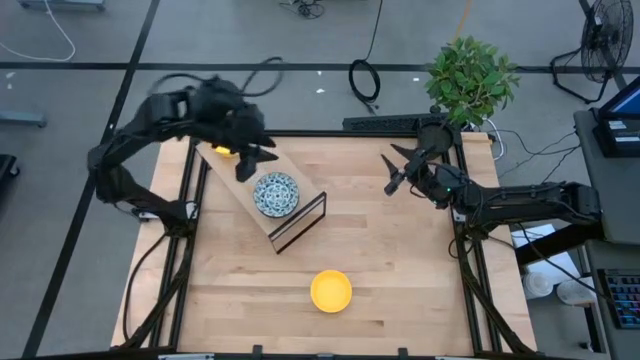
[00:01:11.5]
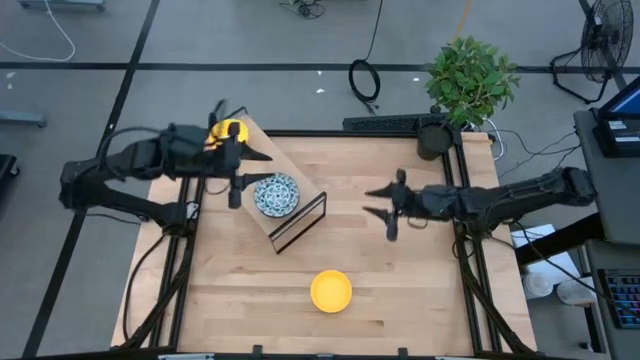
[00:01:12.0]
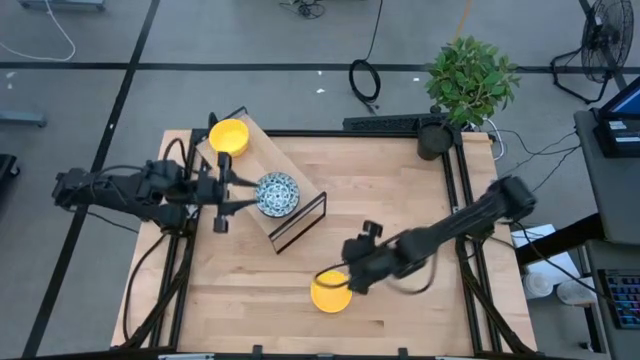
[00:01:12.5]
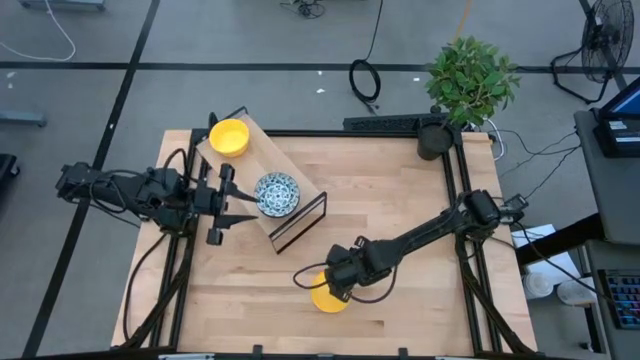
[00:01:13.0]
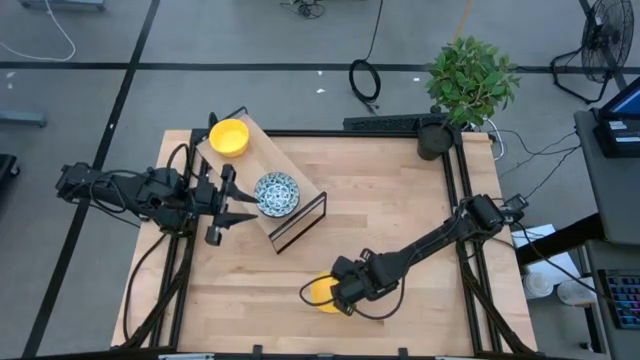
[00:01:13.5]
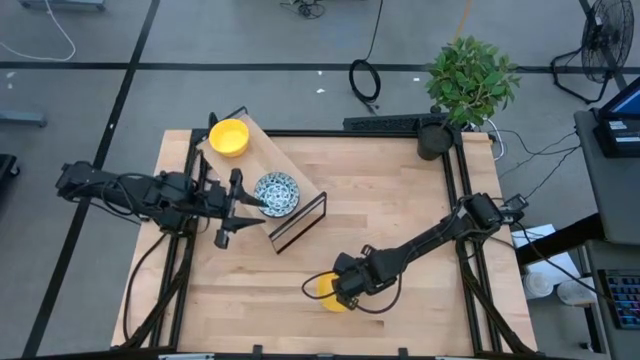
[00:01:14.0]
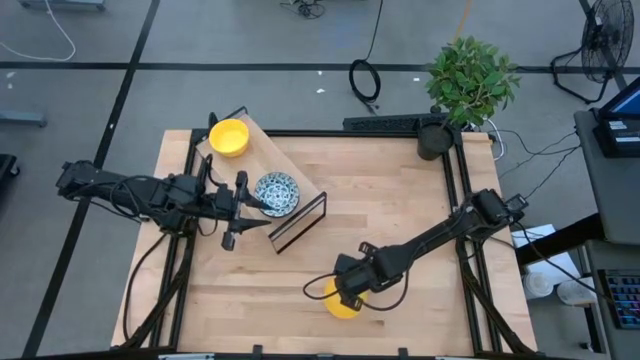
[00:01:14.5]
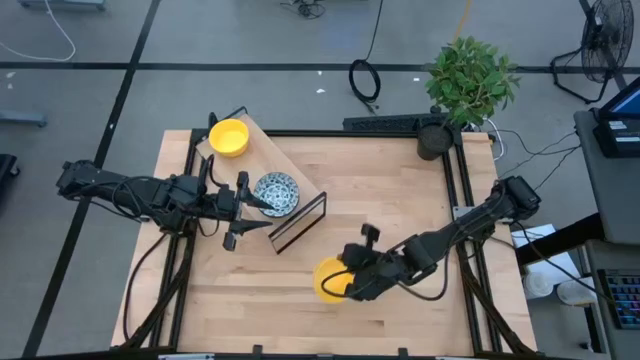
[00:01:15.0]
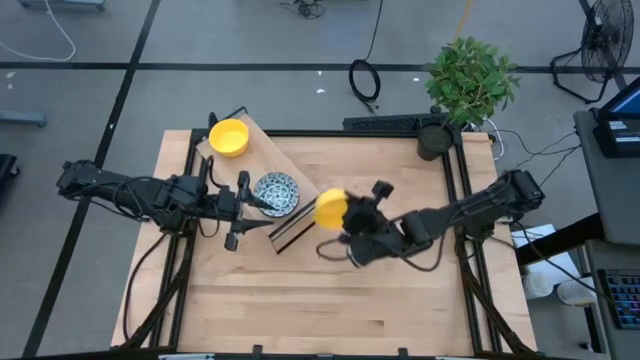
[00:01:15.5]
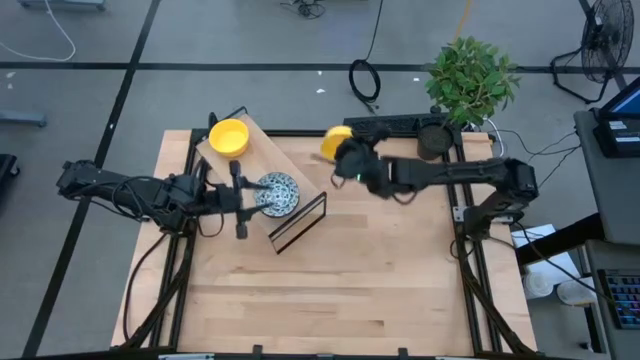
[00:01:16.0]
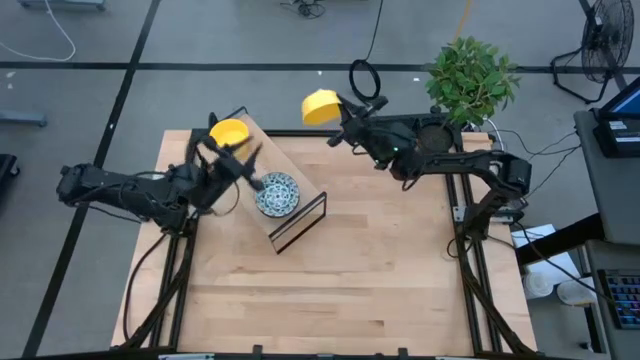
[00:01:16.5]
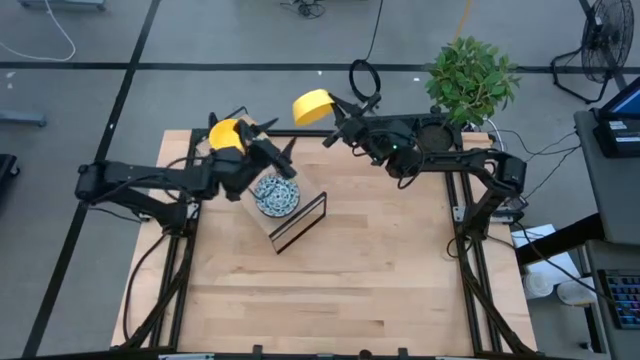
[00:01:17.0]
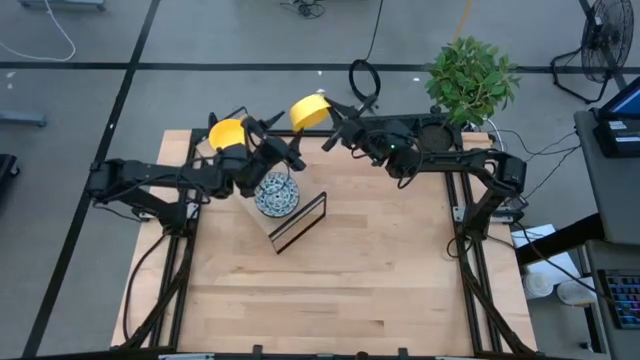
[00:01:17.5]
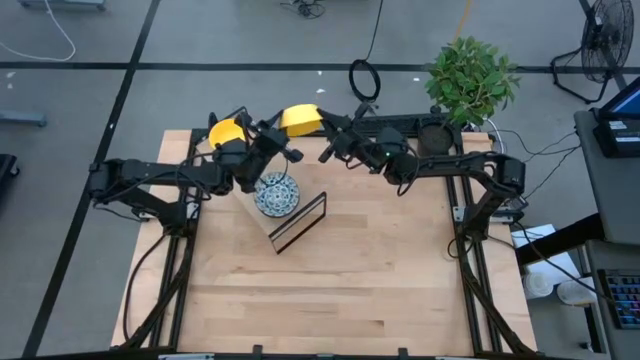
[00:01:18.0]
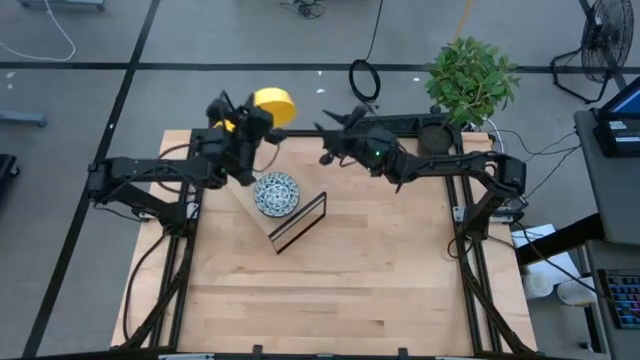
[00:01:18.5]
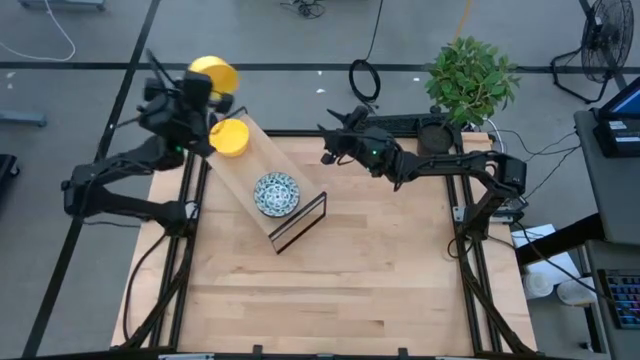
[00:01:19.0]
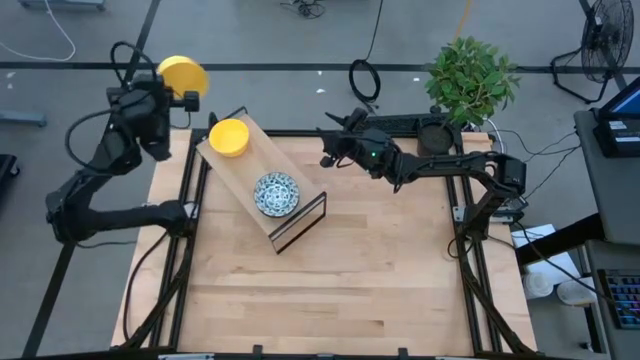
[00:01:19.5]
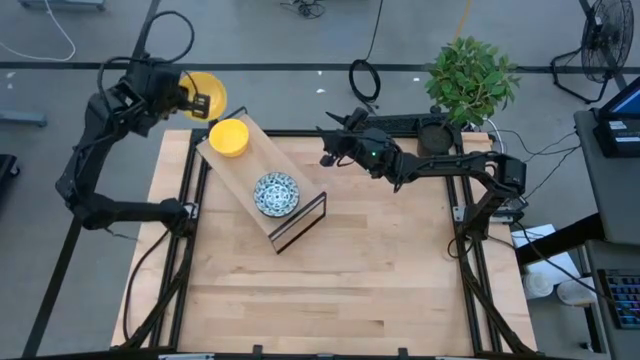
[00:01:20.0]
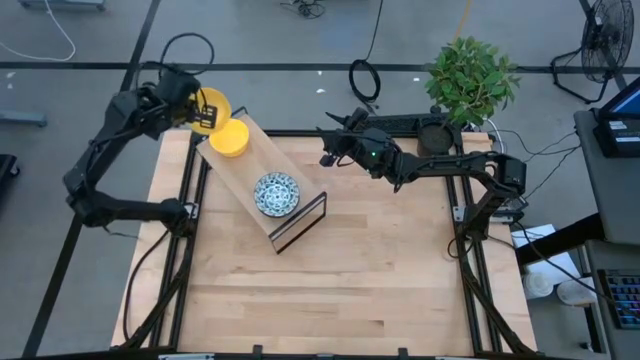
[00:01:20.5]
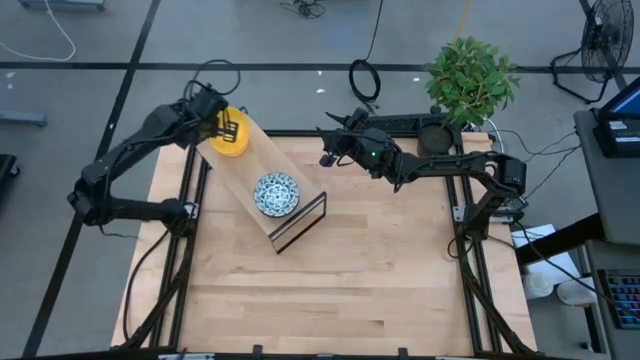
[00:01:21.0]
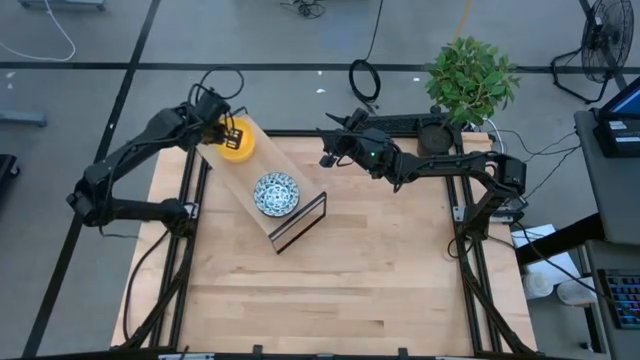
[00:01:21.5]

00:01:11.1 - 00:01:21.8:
Task: Pick & Place Mini bowls
Stack the yellow bowl on the yellow bowls on the shelf

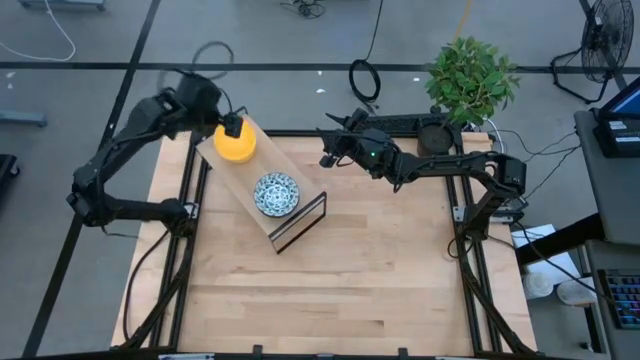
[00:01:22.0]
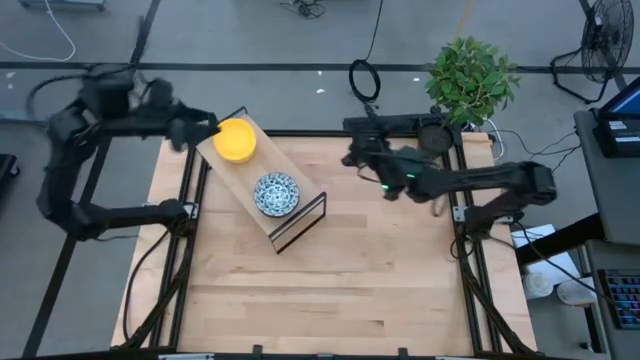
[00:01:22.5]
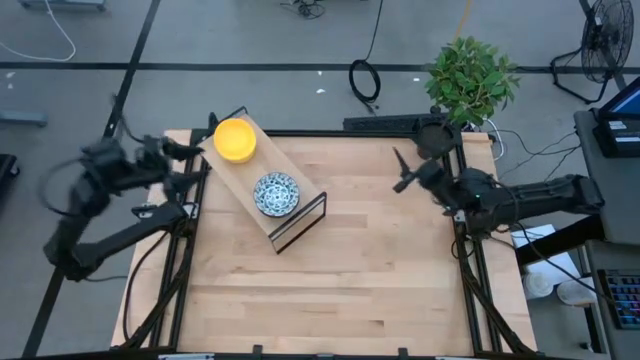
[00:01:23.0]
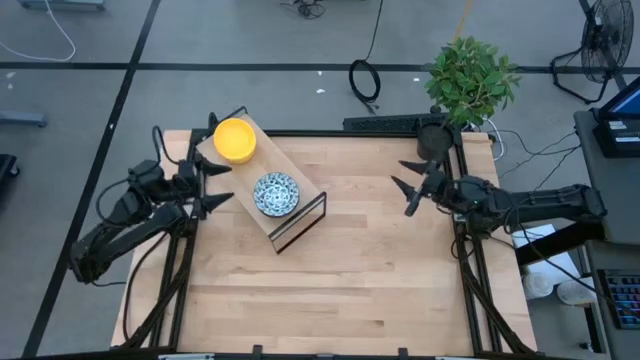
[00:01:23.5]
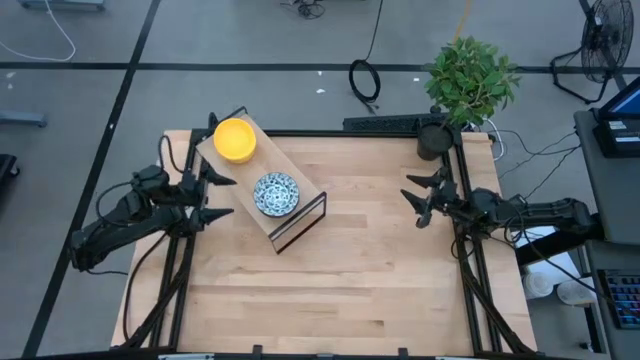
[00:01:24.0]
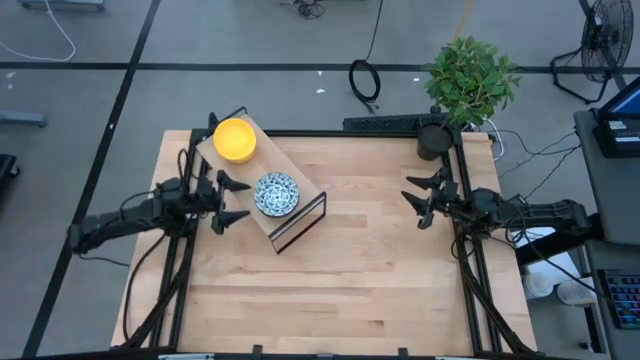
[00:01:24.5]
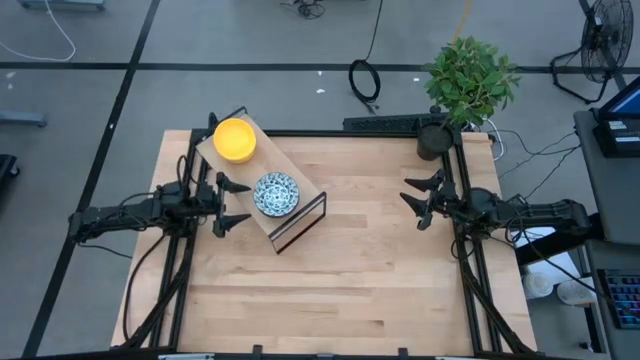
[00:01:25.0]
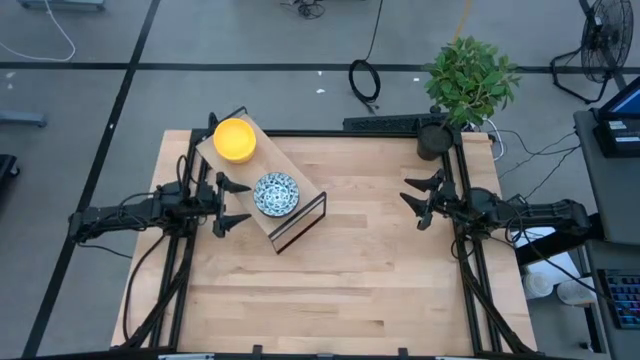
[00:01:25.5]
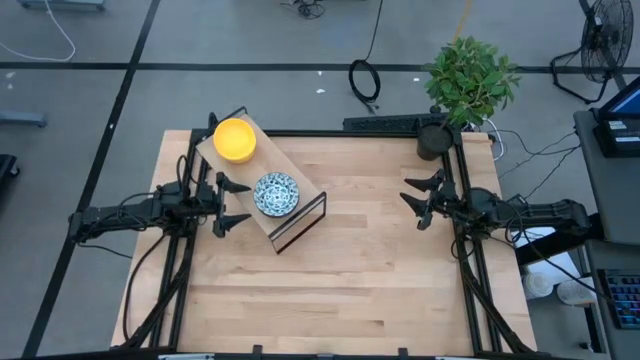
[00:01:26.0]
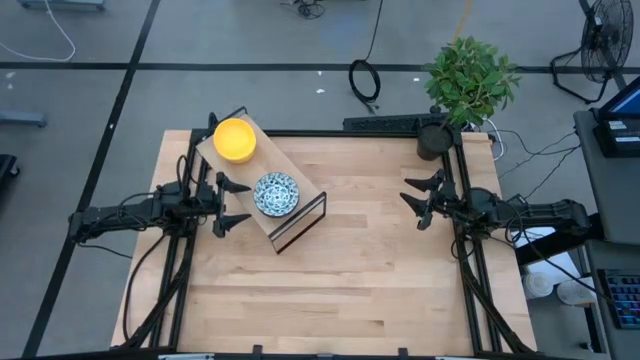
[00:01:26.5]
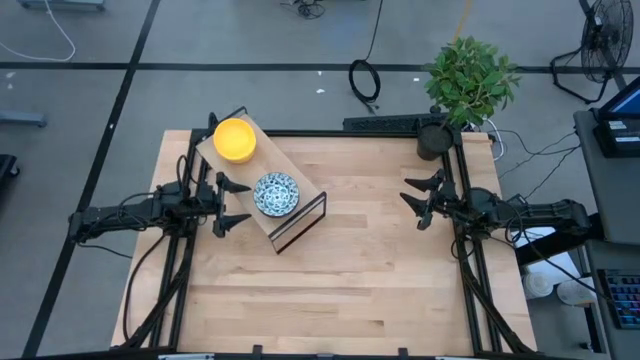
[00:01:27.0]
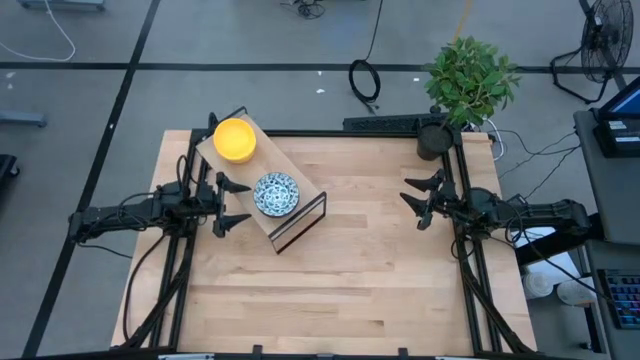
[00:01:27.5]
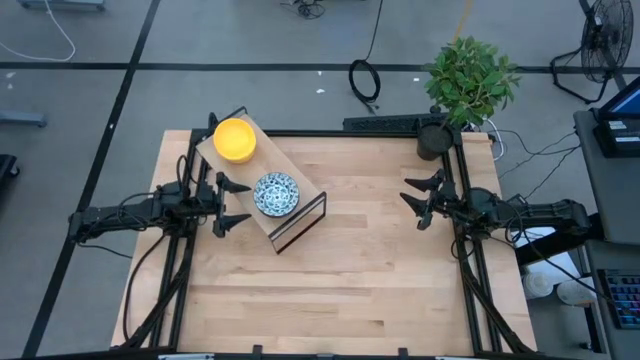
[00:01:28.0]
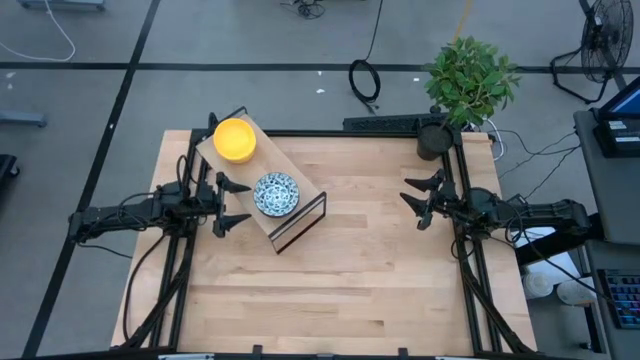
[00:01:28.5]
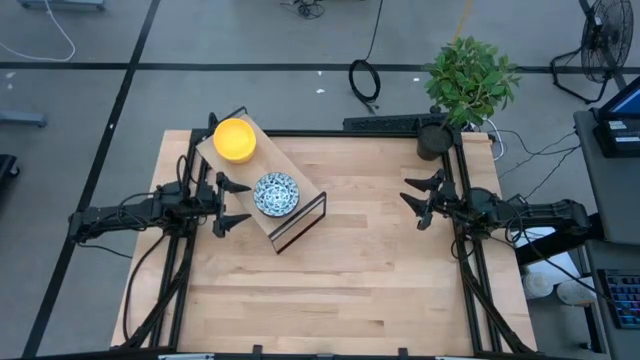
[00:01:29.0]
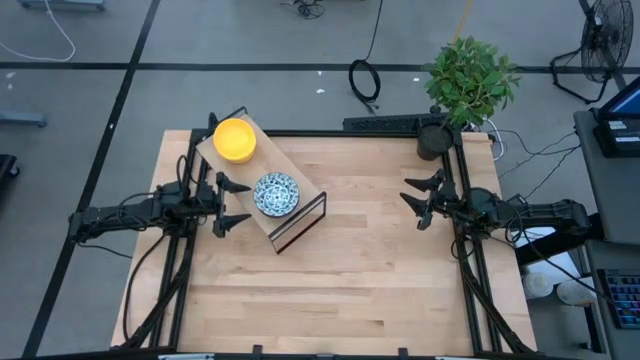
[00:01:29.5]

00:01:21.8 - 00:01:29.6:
Return to Home Position

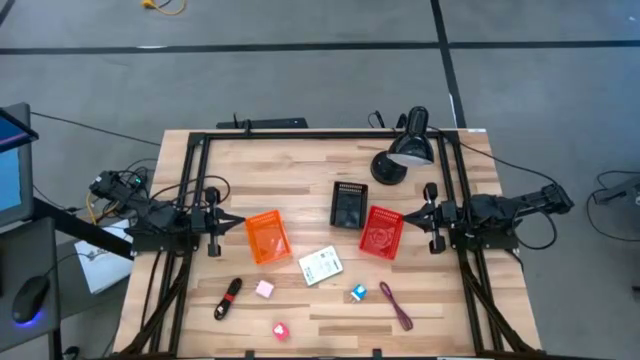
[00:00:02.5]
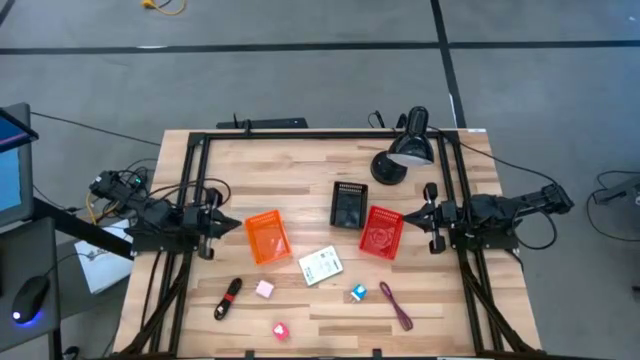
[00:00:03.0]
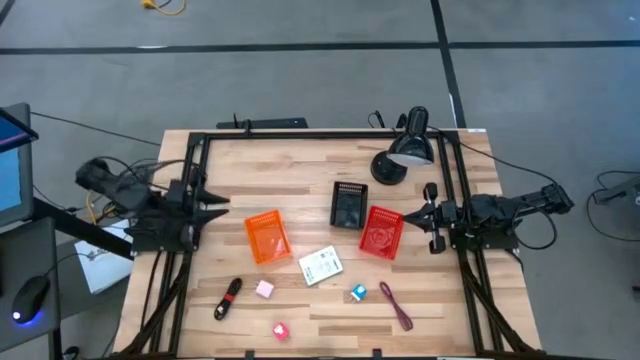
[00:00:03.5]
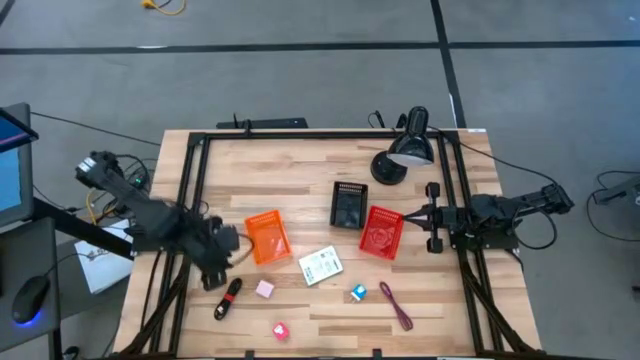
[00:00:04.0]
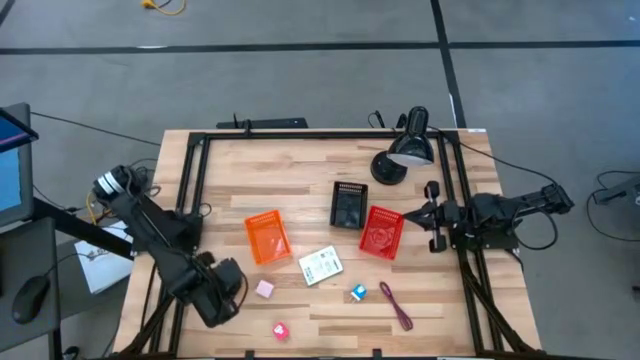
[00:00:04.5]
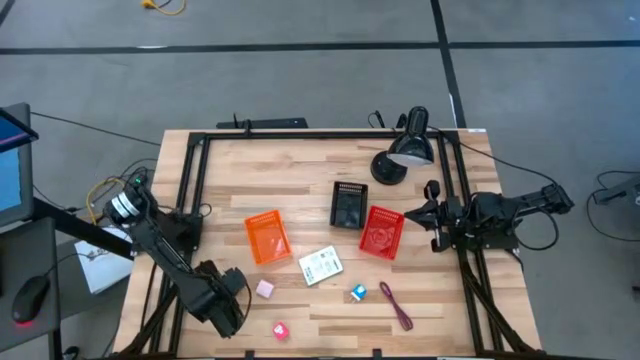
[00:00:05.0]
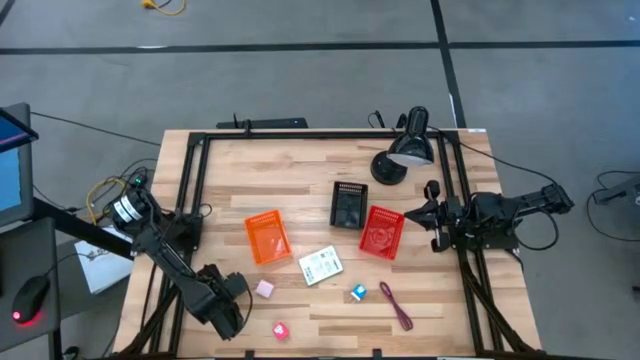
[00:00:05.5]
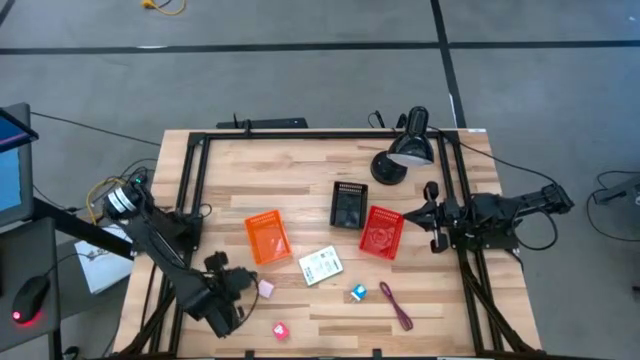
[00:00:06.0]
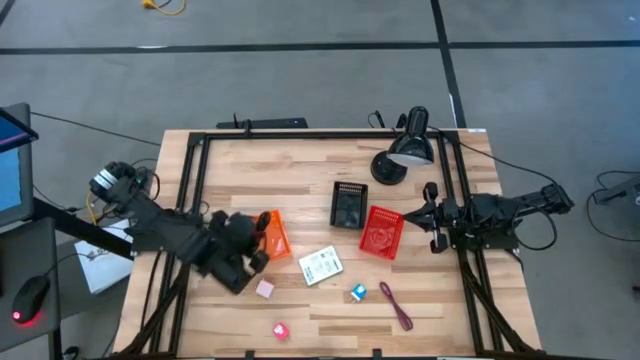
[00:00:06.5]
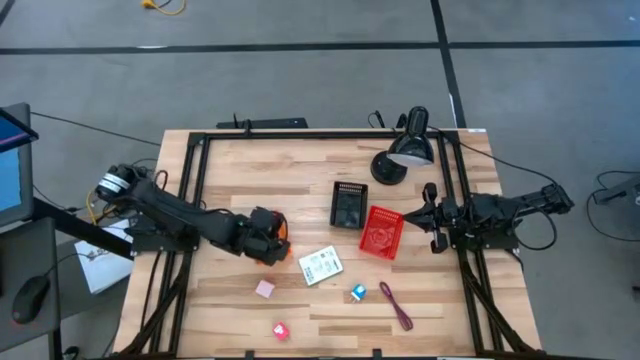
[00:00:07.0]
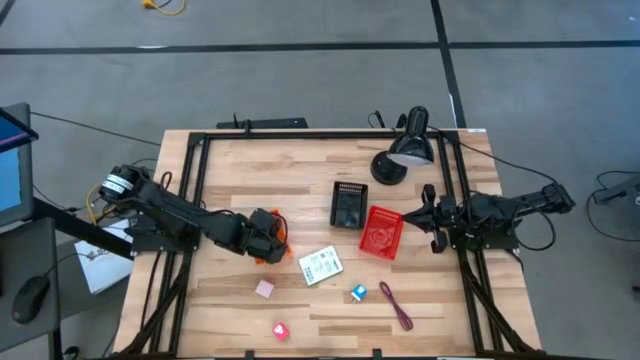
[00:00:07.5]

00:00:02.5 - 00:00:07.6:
Task: Pick and place items into bin
Put the black charger cable into the orange bin
